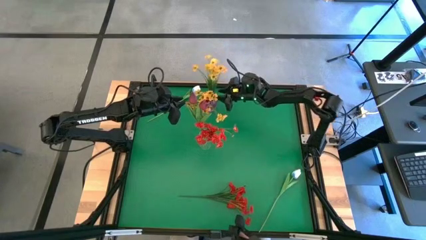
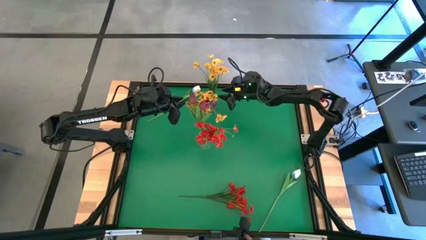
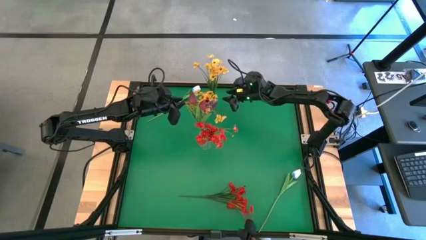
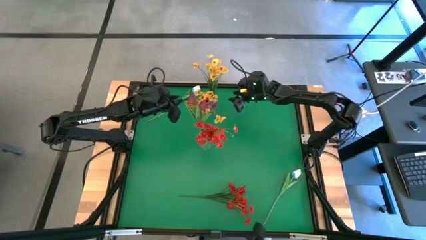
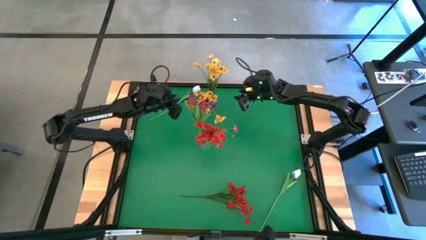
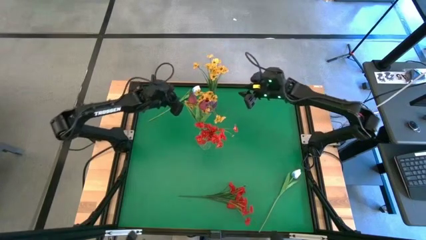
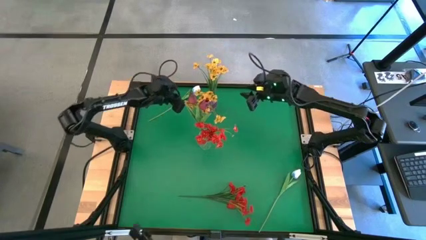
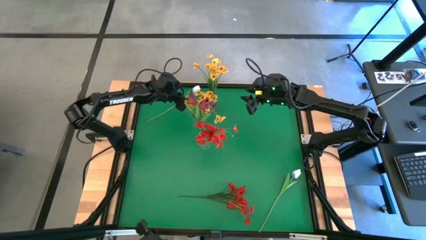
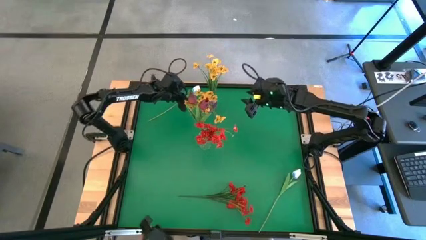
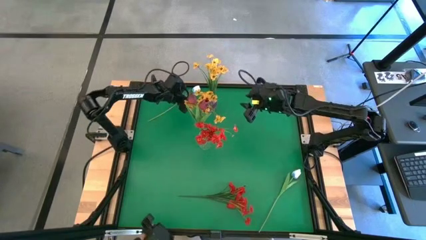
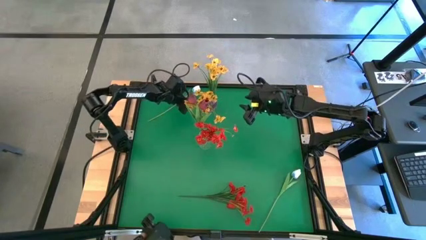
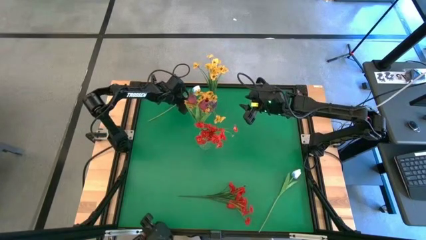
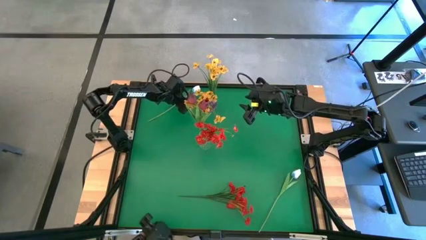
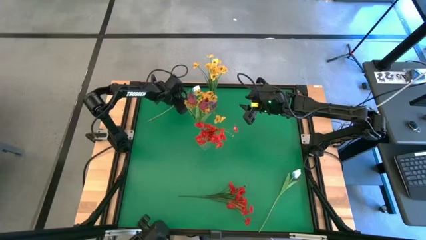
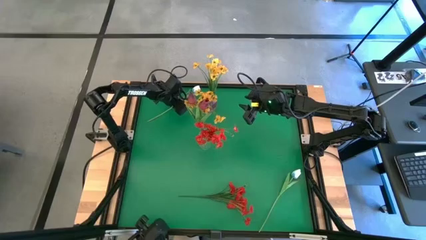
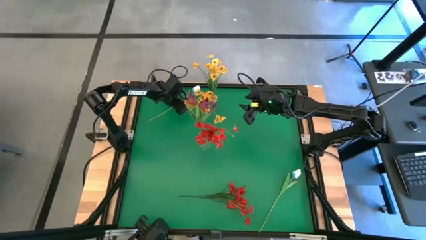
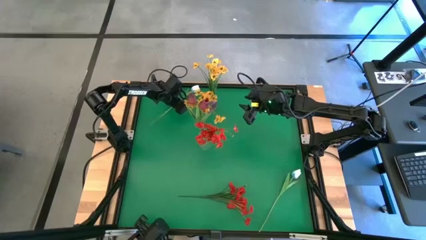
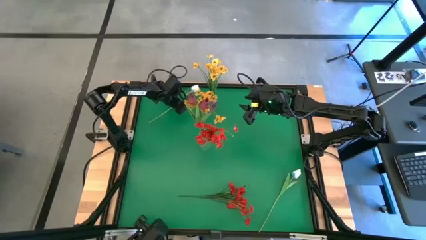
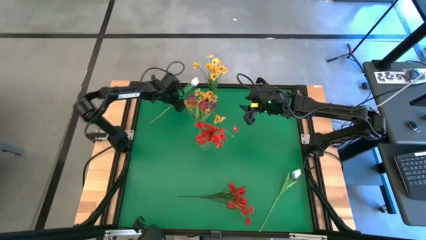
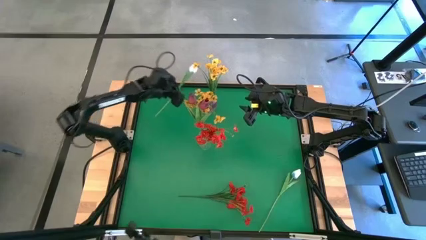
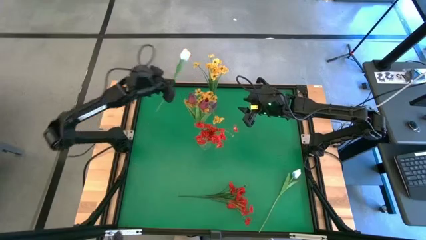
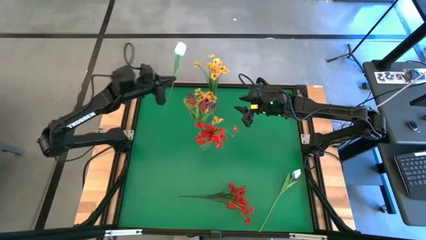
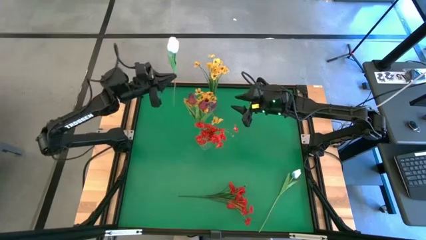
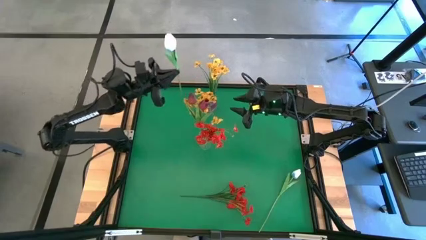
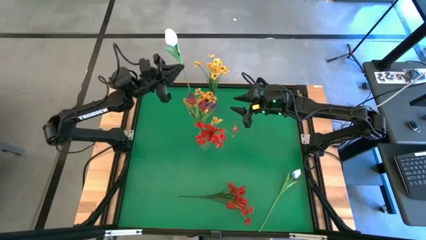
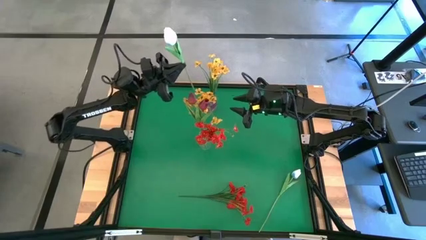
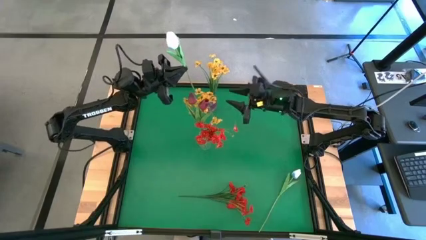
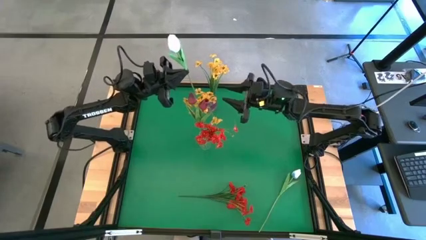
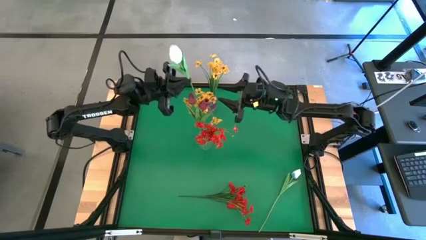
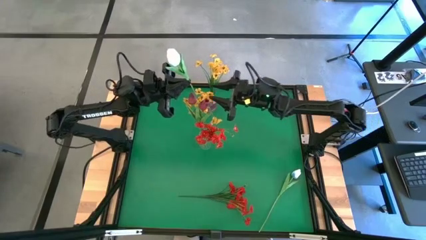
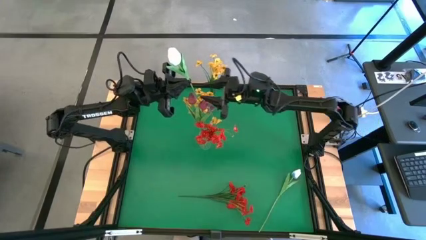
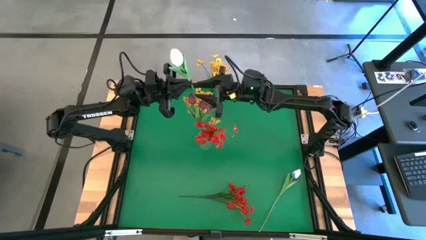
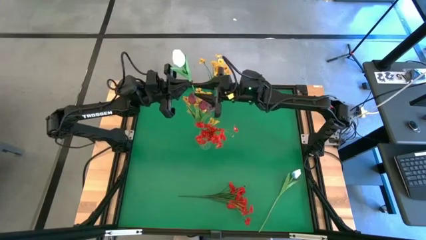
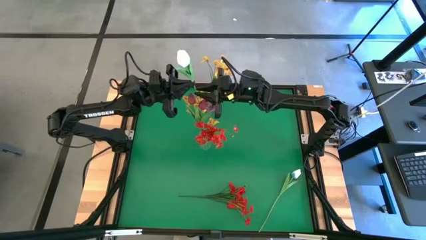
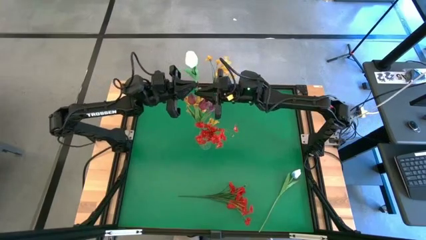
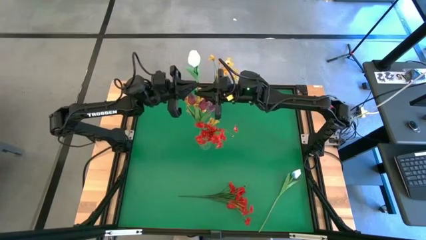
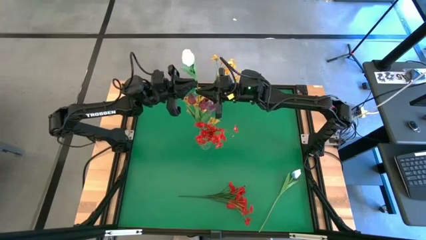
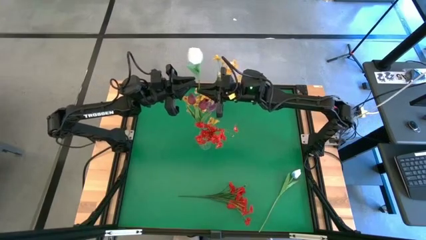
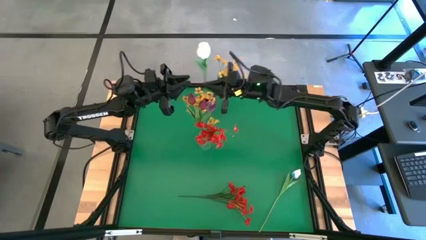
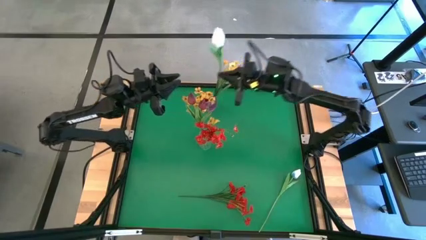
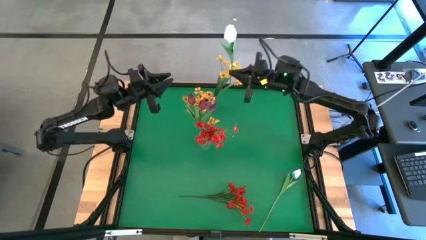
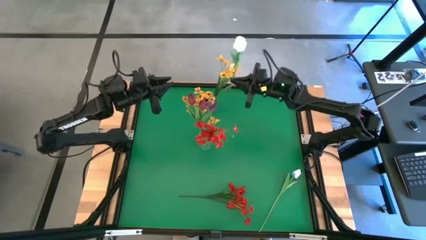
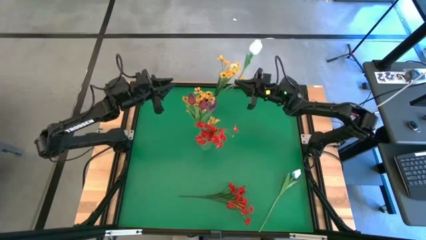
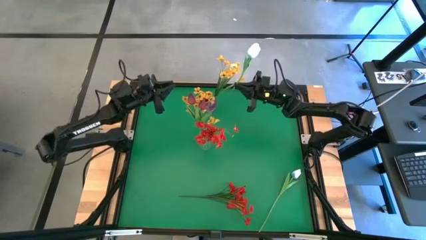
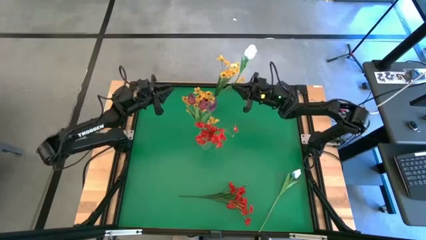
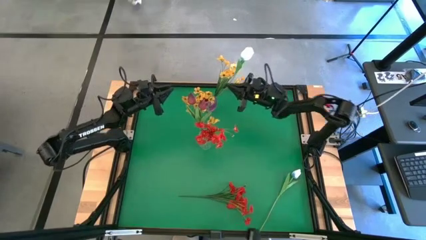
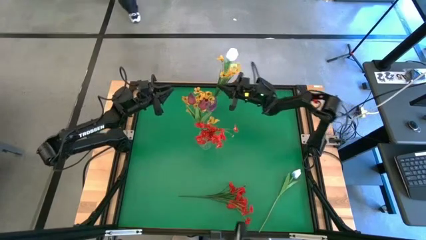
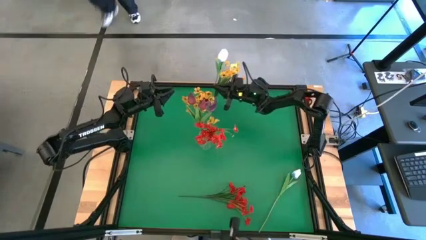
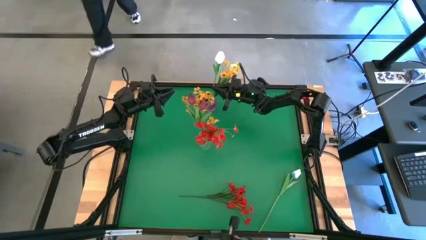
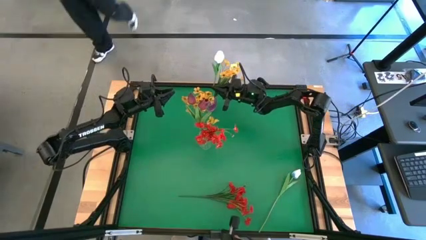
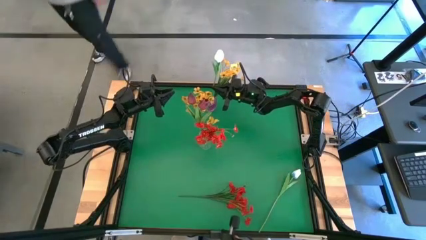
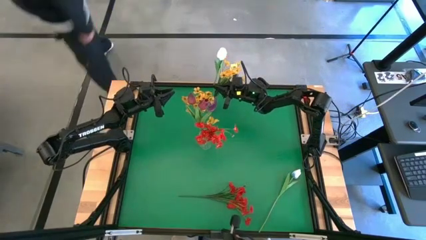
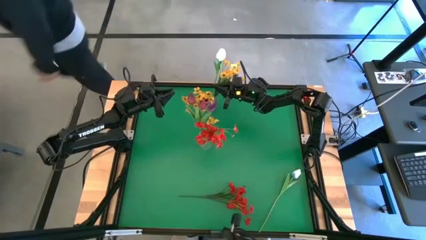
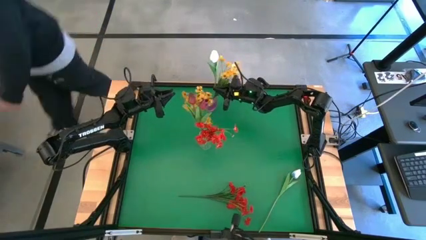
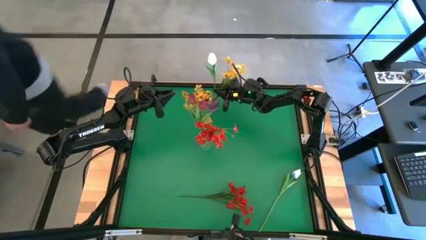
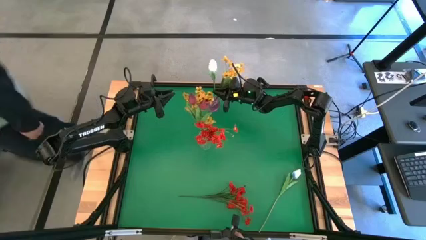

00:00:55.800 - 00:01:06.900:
Task: Sort flowers into vase by color
Put the top white flower into the pink transparent vase

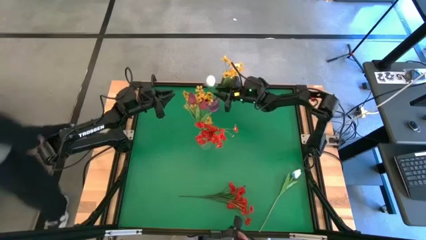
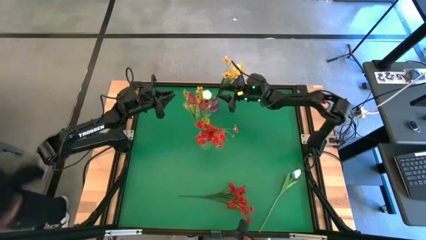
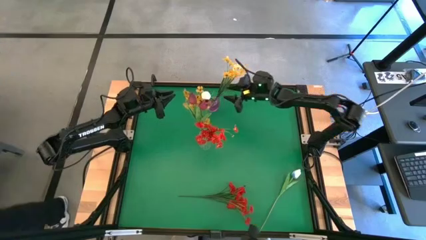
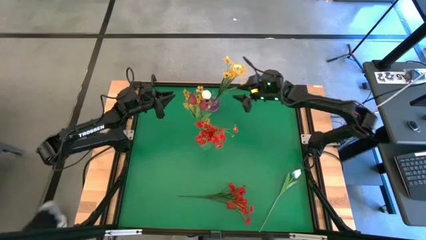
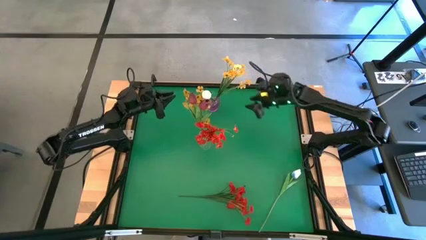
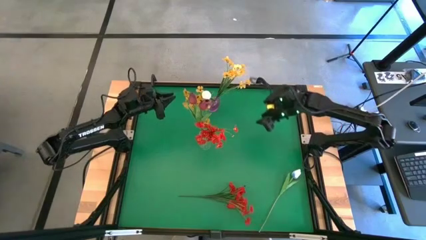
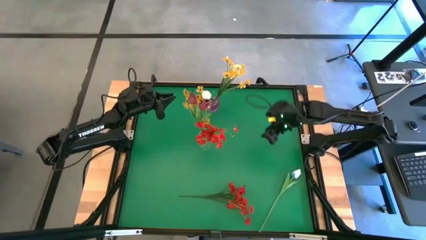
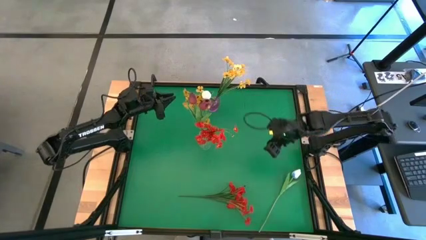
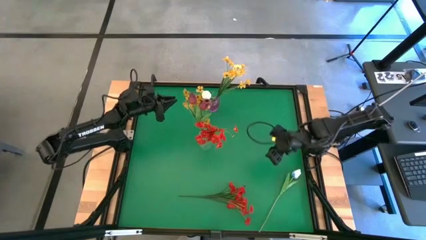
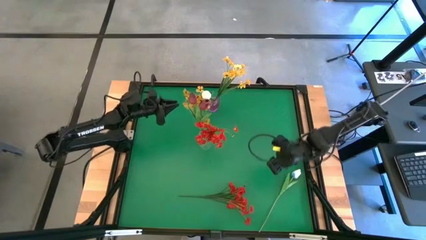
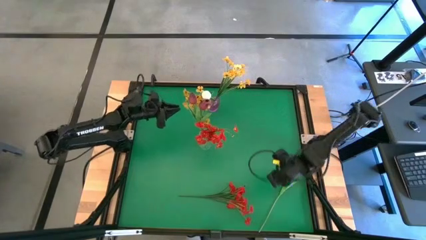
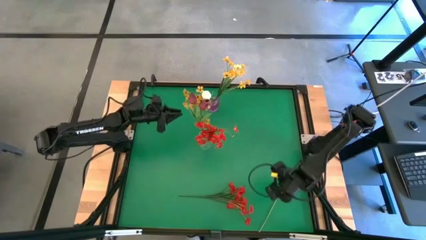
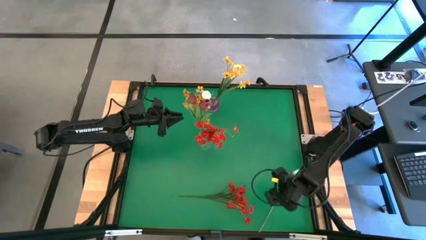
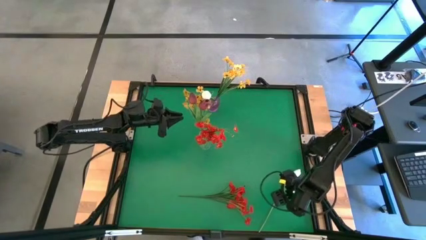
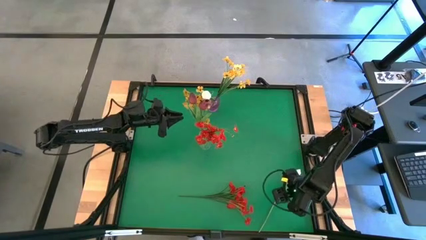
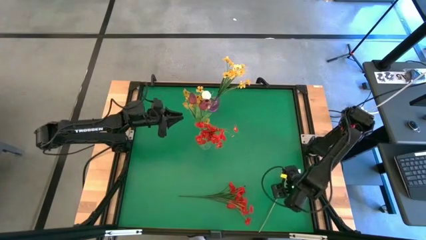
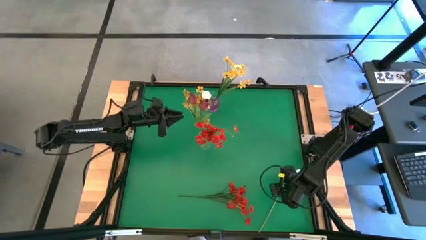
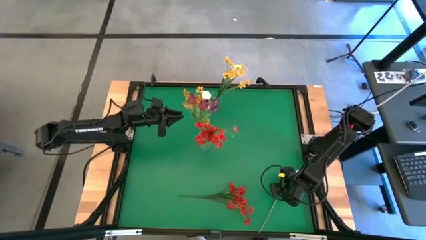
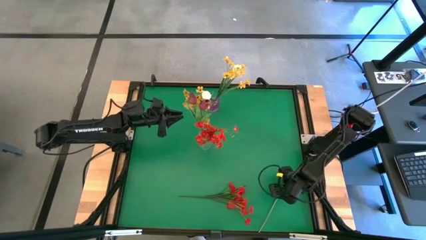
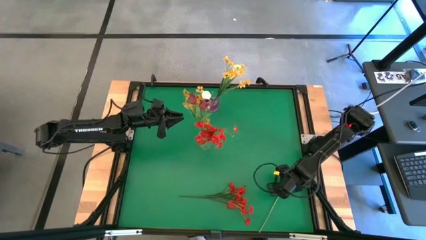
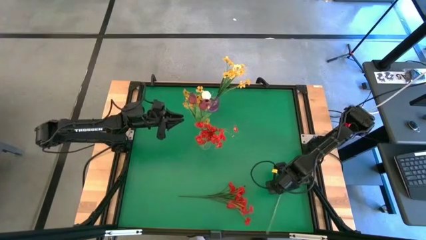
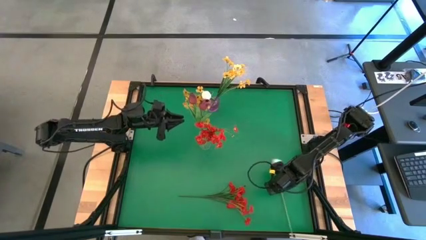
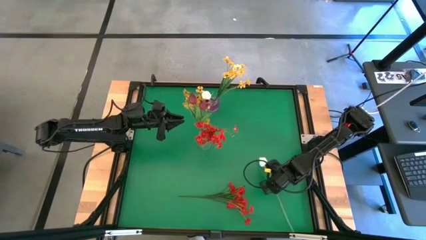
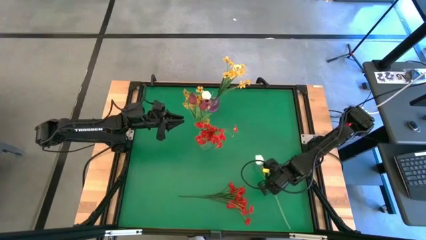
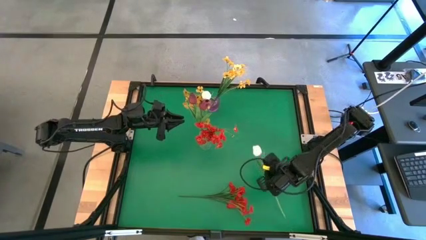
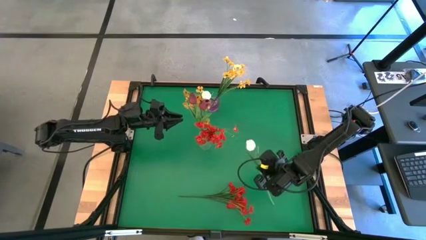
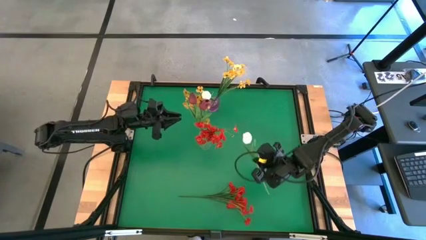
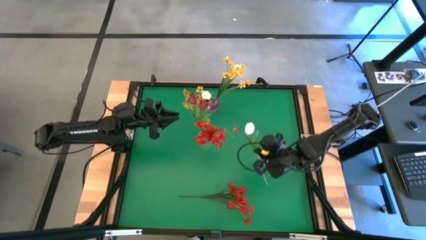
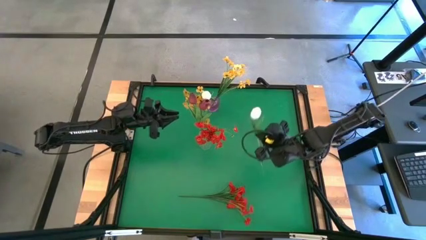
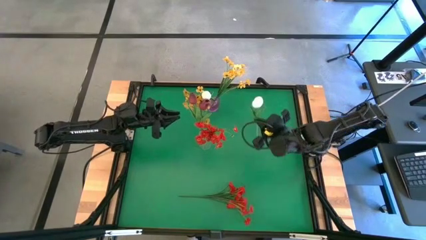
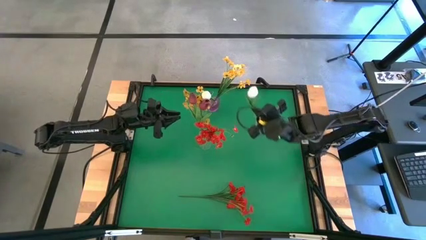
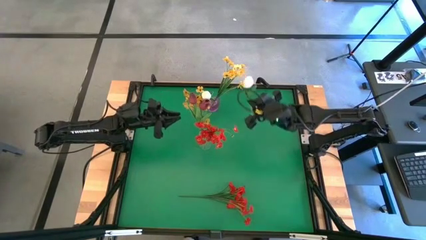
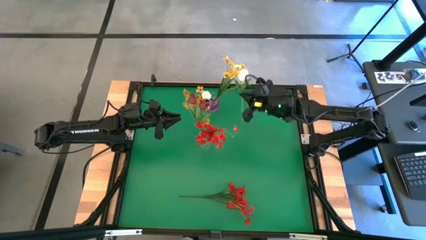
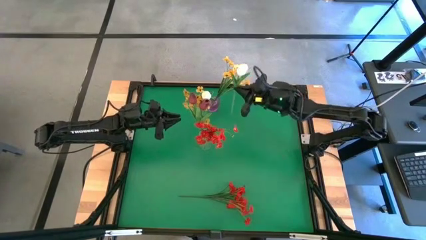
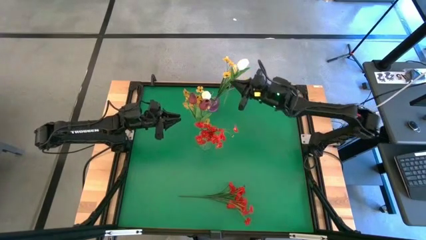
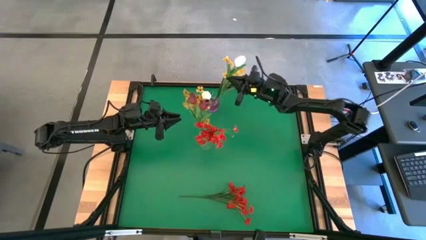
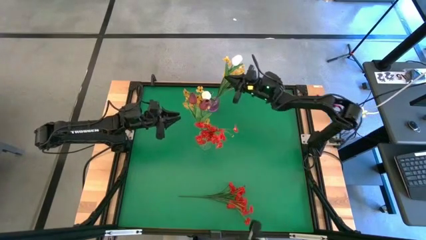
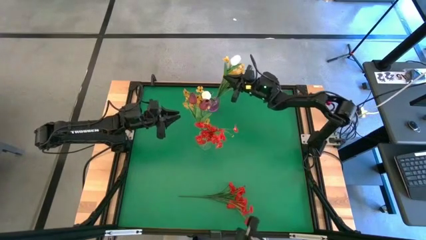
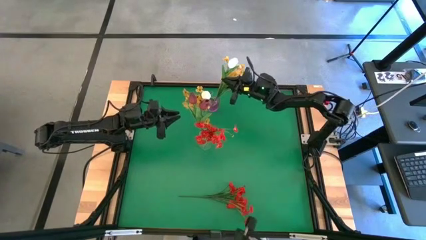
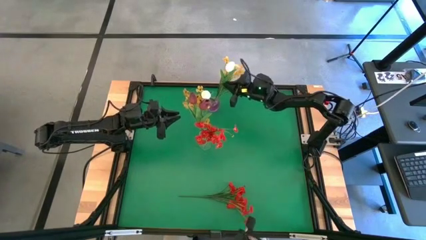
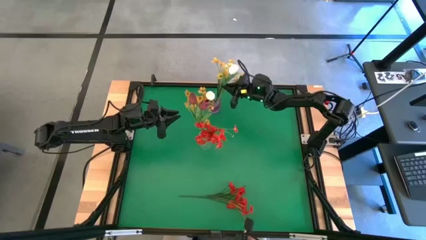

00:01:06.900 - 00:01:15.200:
Put the white flower into the pink transparent vase
